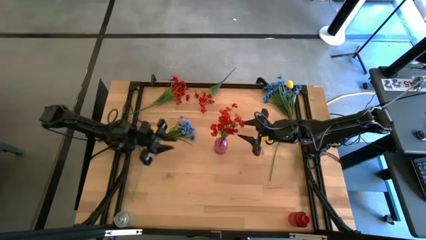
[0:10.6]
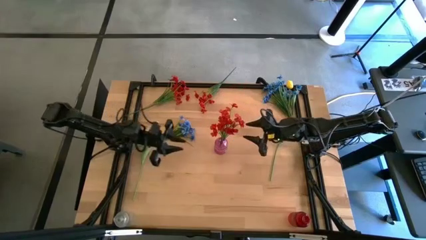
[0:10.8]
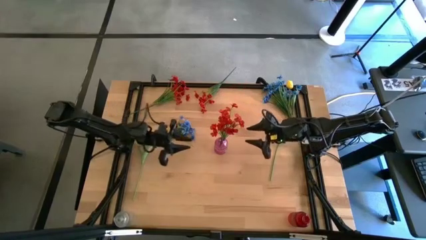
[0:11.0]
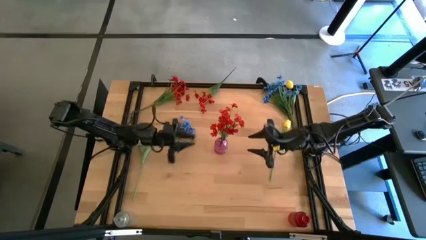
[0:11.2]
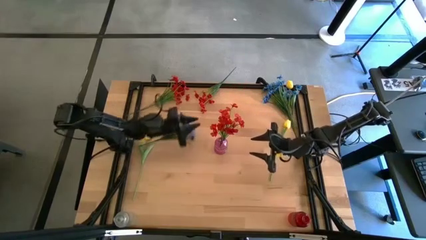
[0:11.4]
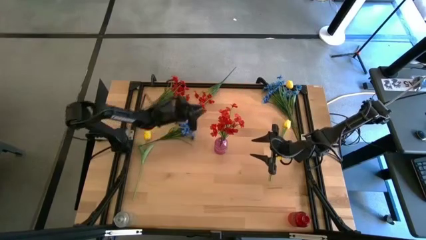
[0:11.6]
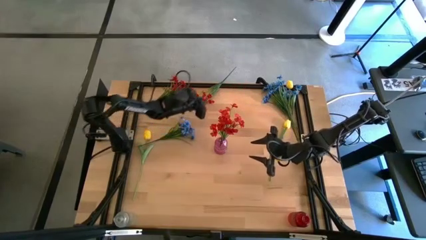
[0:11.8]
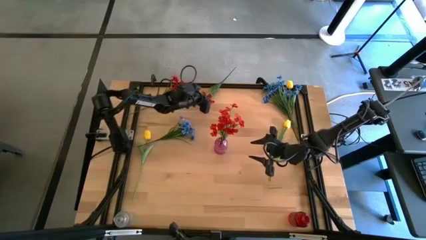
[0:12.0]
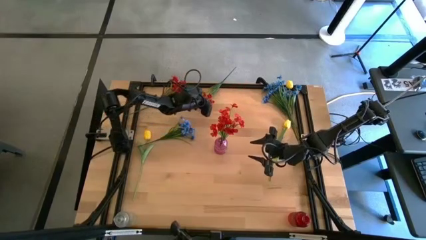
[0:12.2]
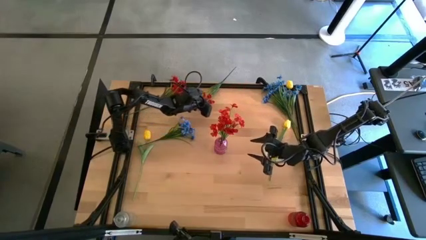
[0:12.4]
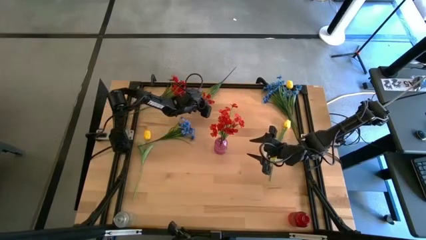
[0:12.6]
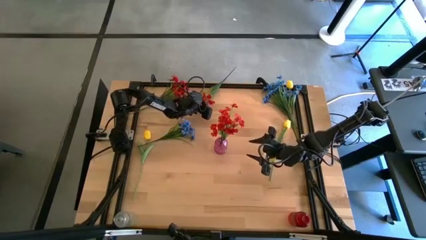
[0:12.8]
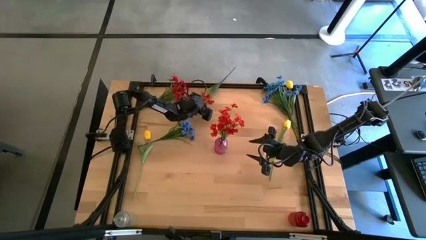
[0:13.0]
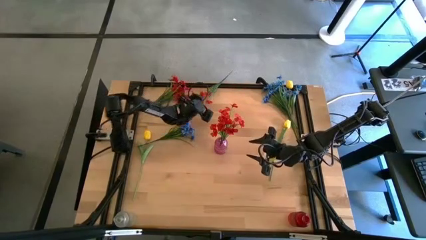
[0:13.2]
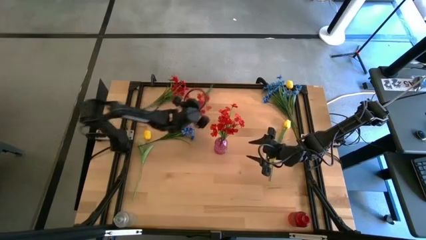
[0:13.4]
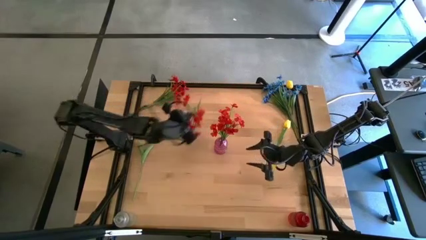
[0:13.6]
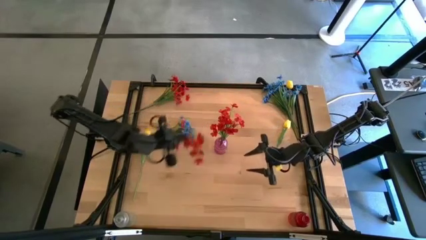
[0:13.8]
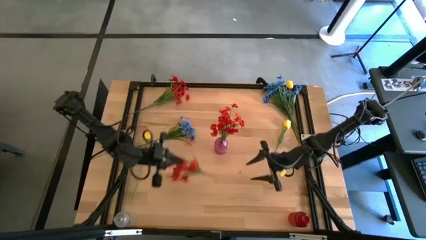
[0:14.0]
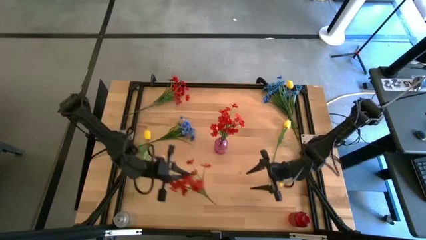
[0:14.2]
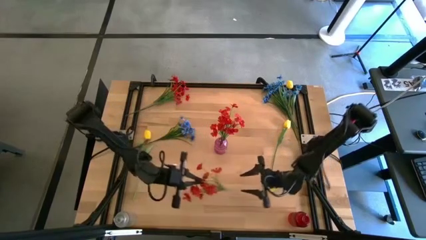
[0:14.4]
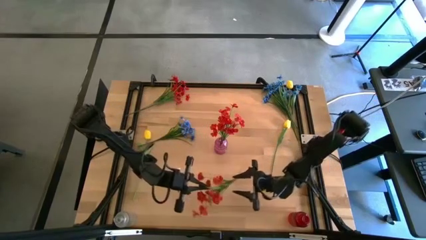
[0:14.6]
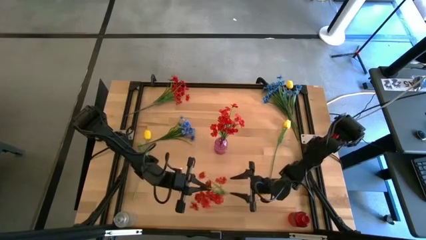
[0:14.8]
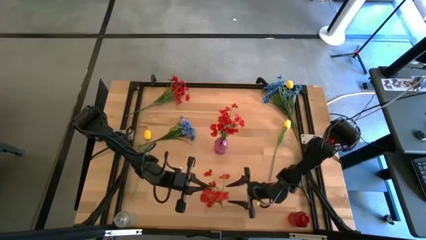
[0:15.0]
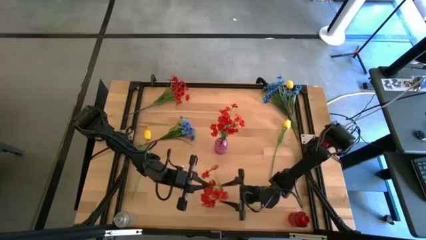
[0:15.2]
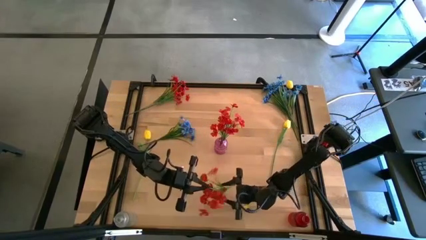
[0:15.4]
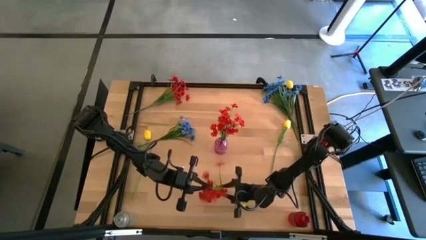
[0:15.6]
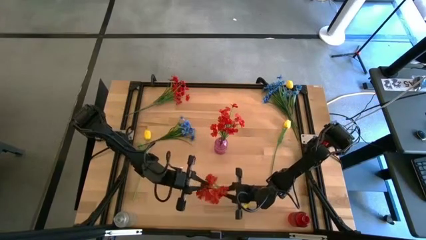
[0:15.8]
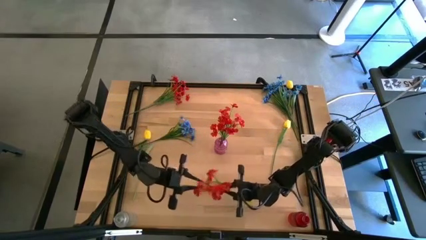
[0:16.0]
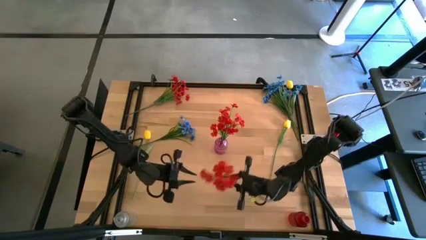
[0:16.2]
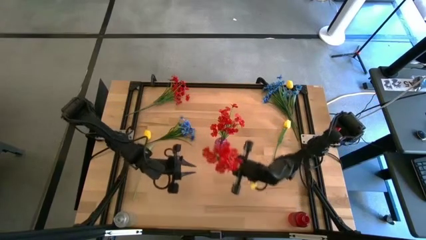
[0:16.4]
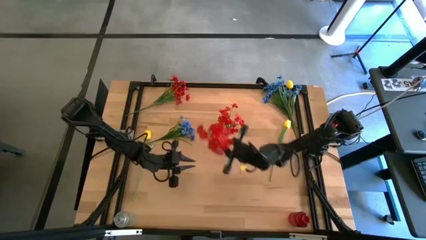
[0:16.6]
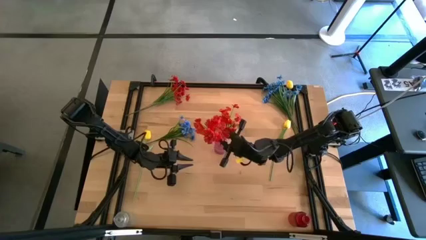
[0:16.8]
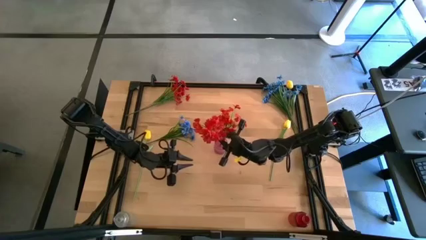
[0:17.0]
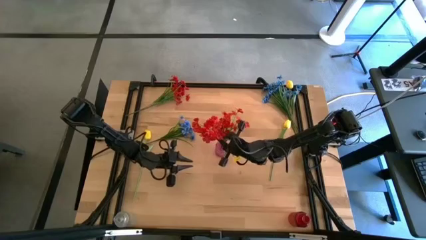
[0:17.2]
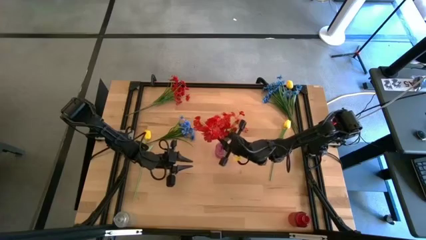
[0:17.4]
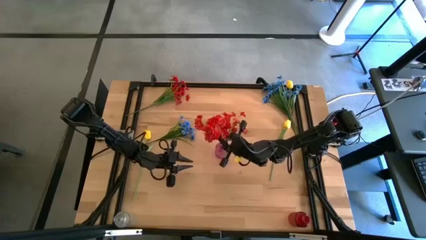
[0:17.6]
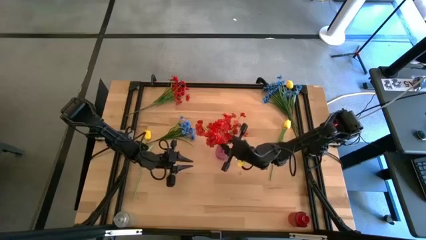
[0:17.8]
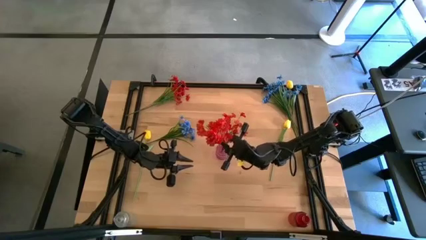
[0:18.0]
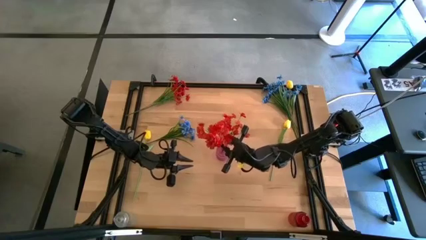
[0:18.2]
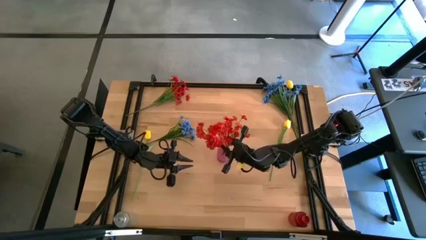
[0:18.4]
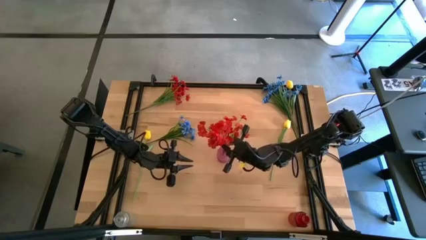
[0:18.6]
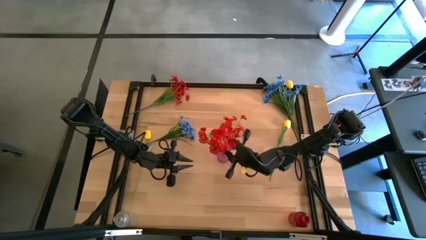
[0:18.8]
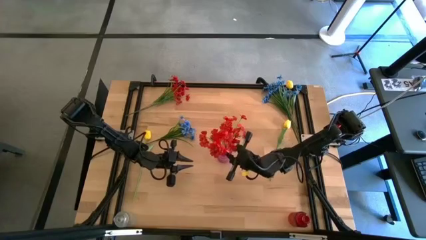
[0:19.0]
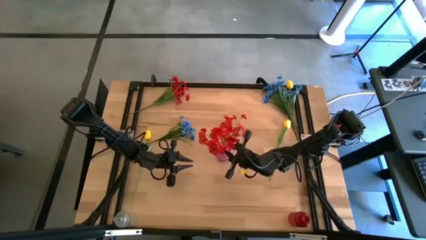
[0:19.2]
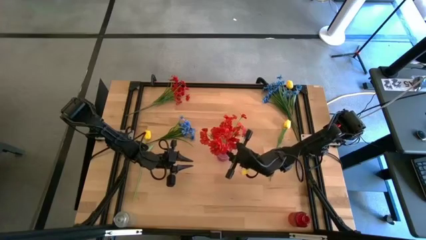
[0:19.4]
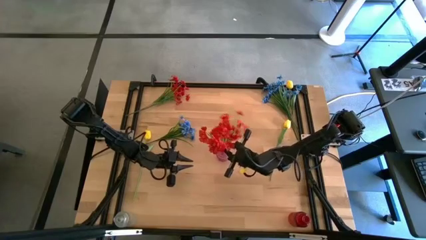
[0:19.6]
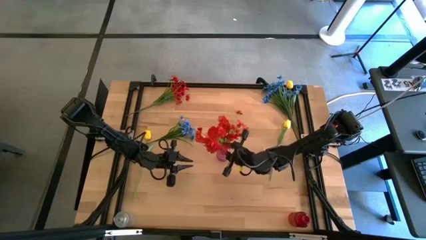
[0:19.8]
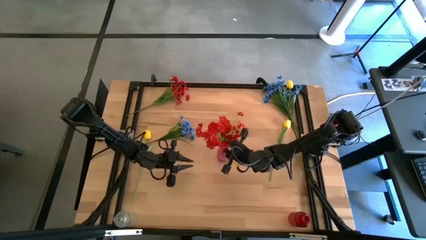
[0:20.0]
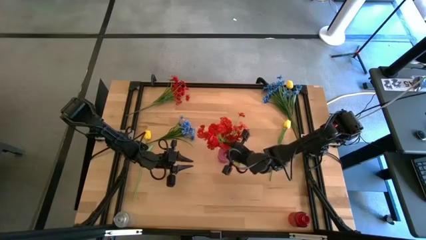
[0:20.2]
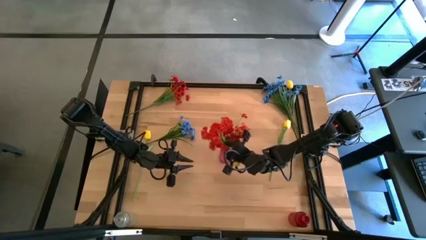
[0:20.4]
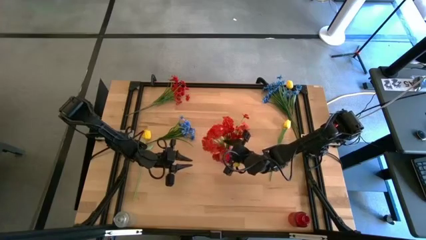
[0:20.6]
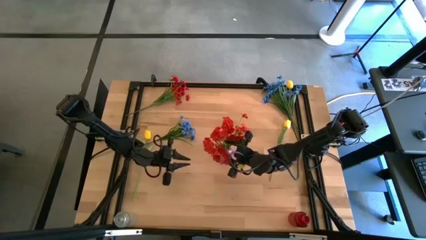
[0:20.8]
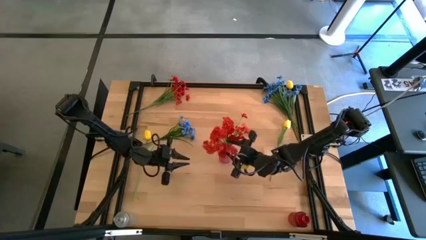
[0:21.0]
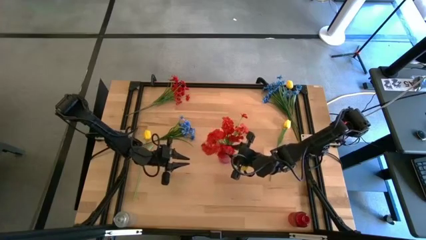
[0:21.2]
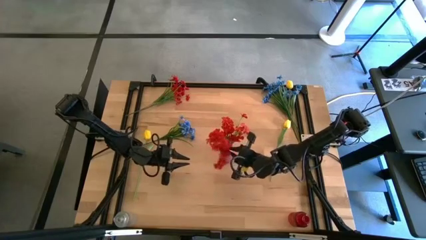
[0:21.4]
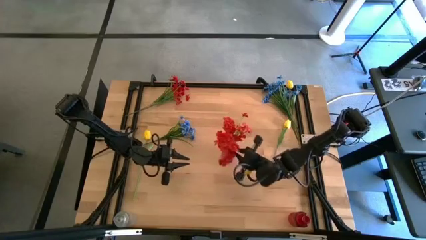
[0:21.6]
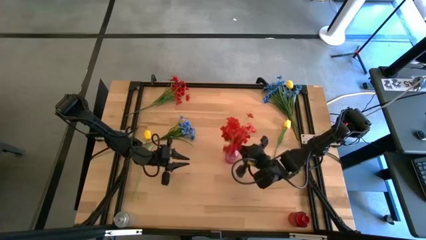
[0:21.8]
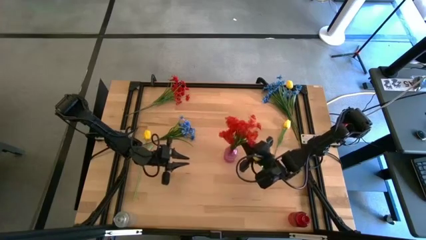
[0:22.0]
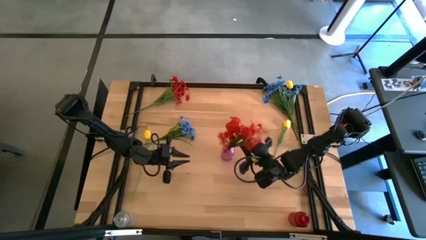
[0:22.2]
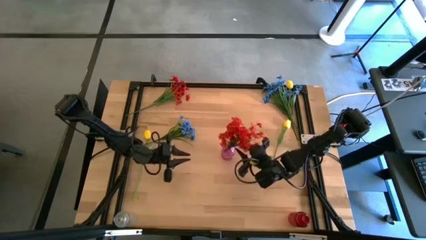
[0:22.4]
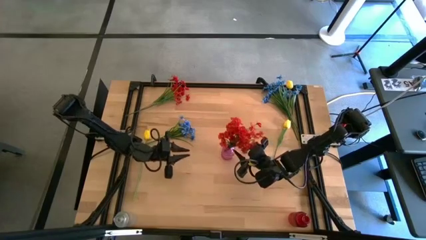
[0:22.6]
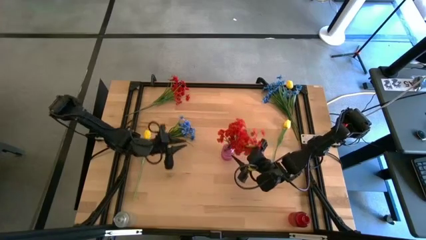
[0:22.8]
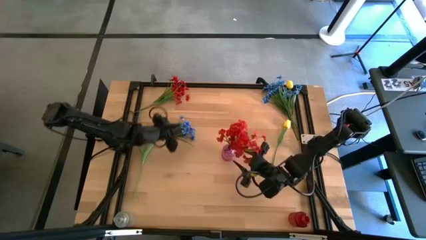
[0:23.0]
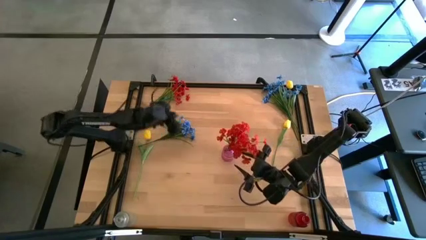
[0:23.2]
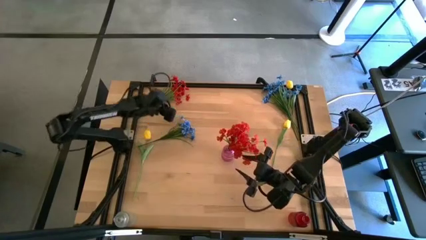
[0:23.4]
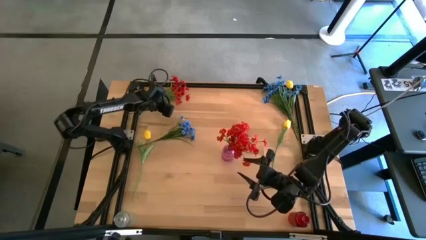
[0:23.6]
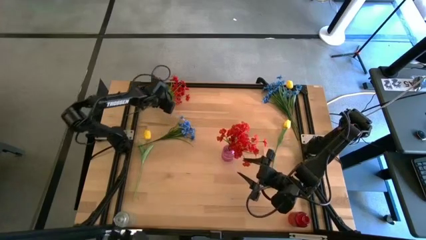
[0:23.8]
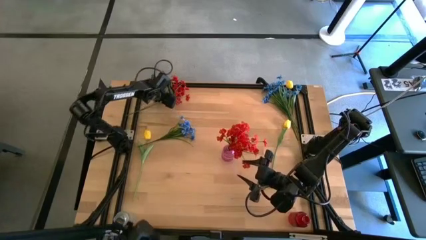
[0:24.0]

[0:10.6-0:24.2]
Task: Sort flowers into vase by color
Put the right red flowers into the violet vase
